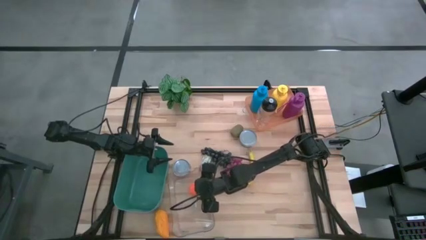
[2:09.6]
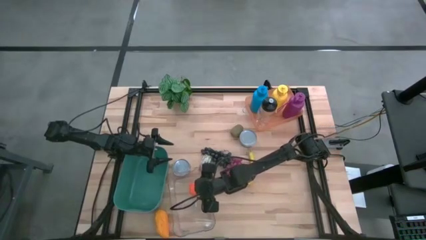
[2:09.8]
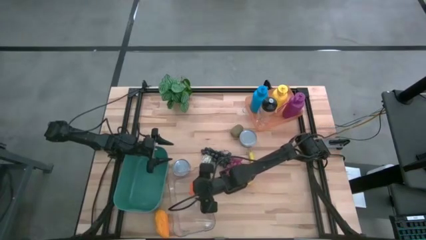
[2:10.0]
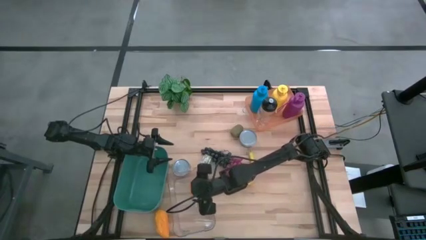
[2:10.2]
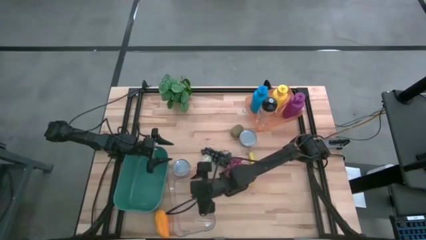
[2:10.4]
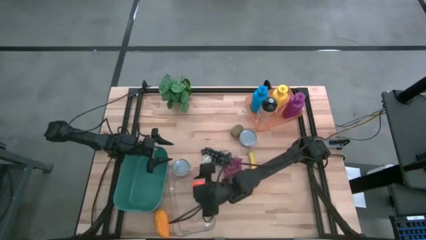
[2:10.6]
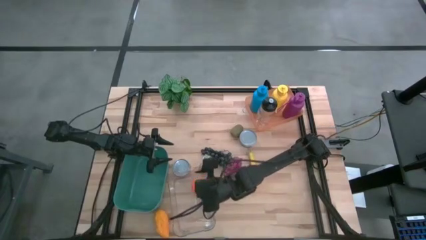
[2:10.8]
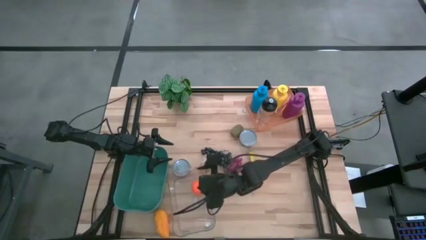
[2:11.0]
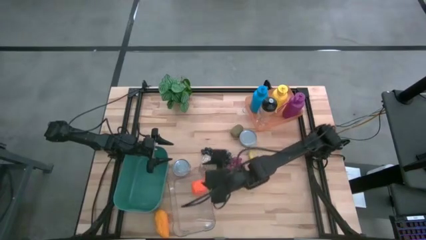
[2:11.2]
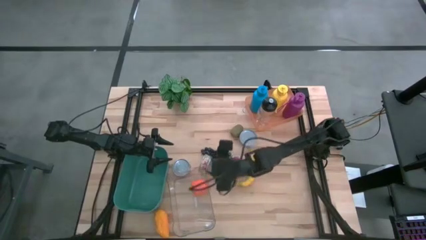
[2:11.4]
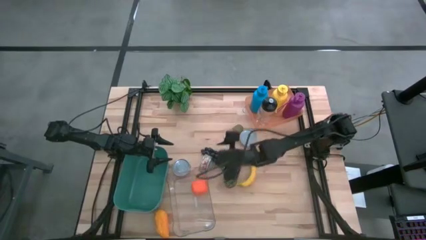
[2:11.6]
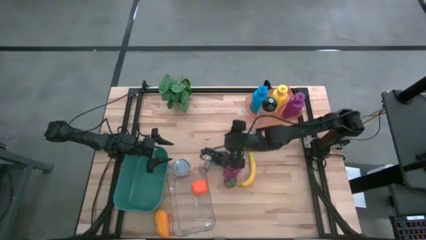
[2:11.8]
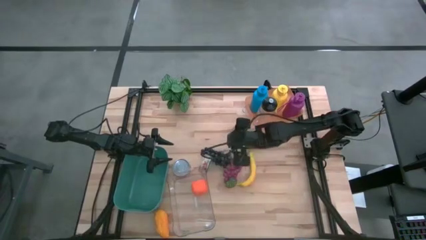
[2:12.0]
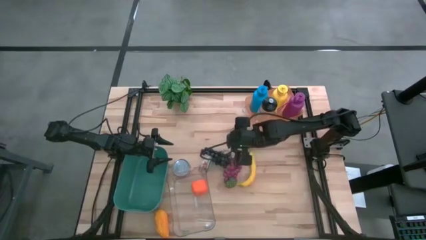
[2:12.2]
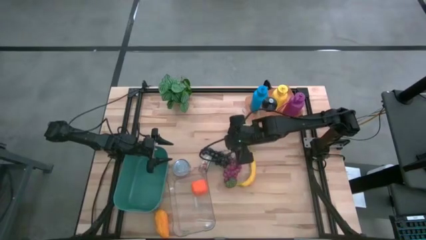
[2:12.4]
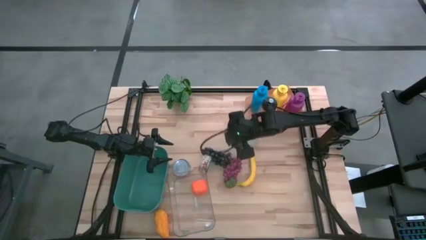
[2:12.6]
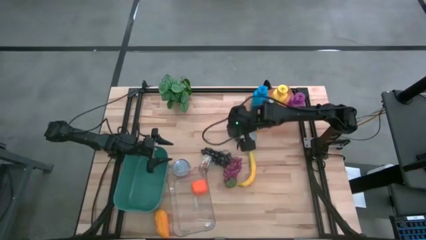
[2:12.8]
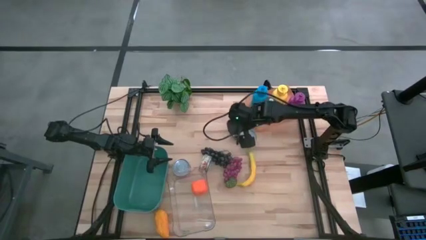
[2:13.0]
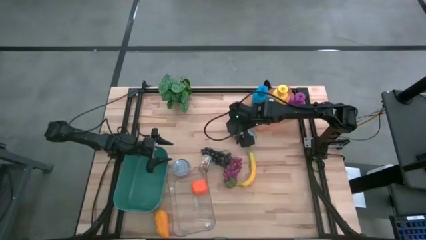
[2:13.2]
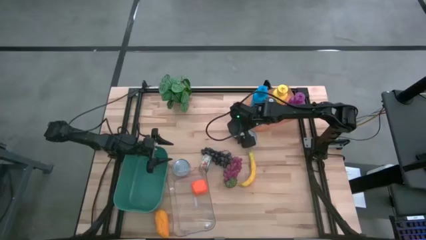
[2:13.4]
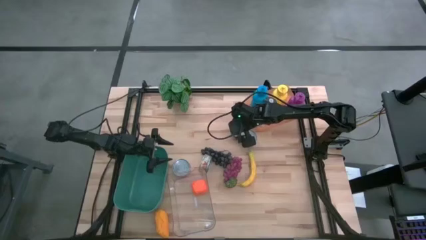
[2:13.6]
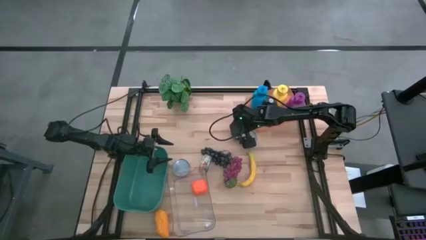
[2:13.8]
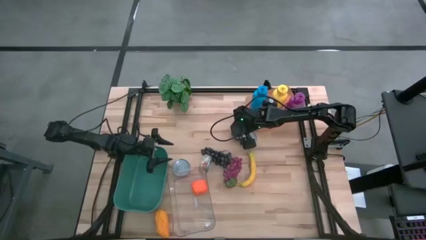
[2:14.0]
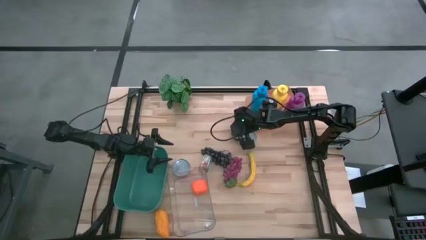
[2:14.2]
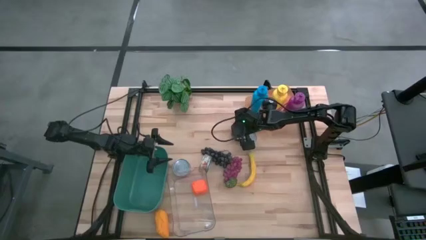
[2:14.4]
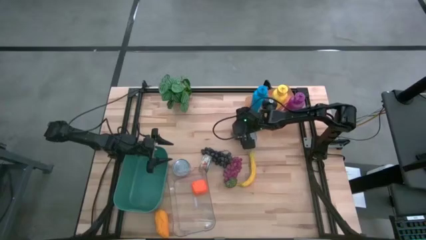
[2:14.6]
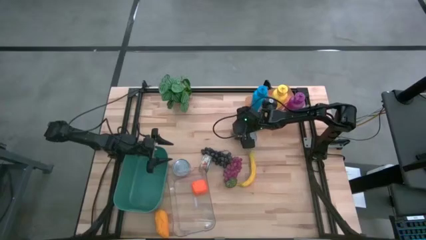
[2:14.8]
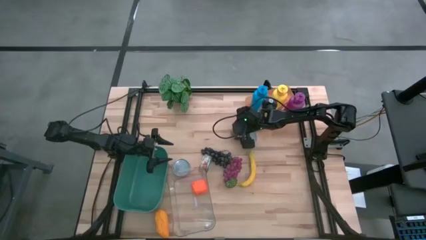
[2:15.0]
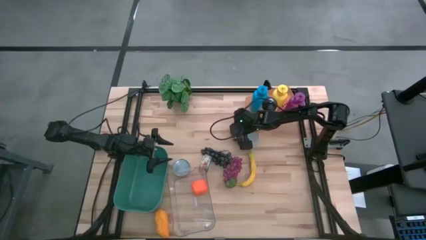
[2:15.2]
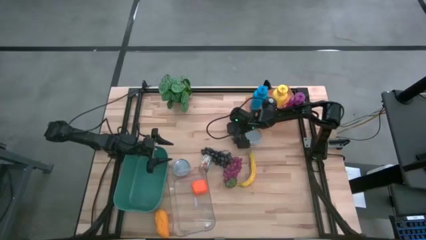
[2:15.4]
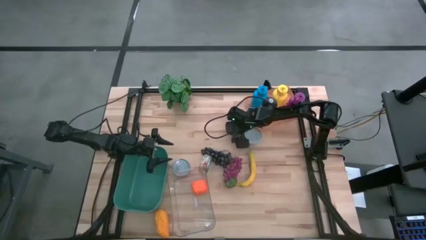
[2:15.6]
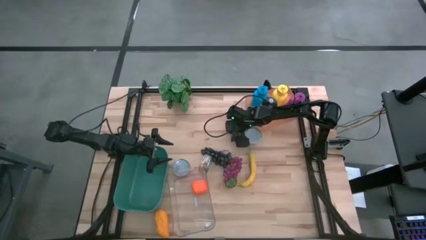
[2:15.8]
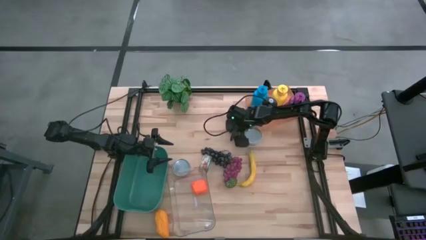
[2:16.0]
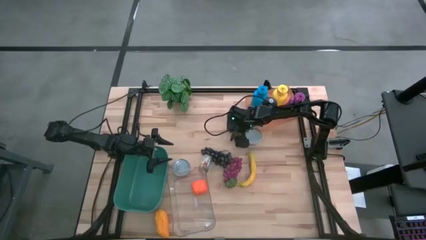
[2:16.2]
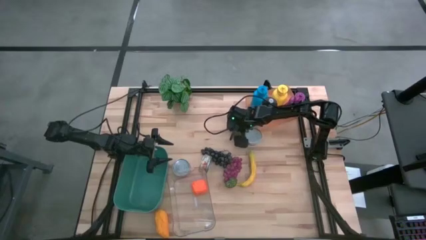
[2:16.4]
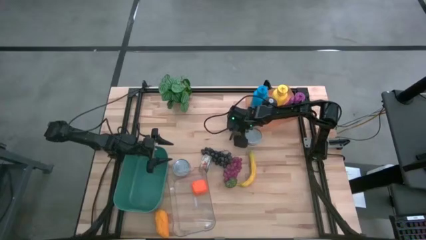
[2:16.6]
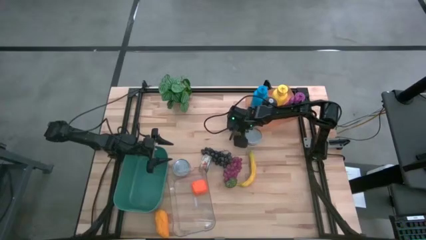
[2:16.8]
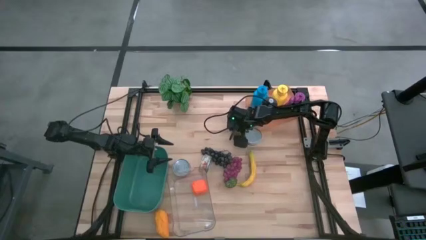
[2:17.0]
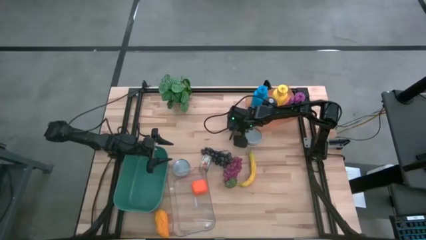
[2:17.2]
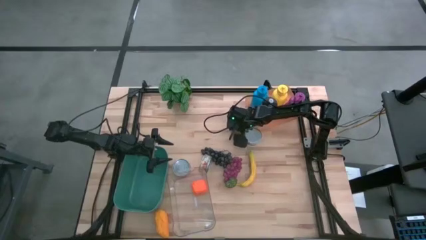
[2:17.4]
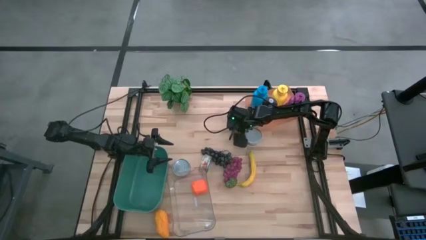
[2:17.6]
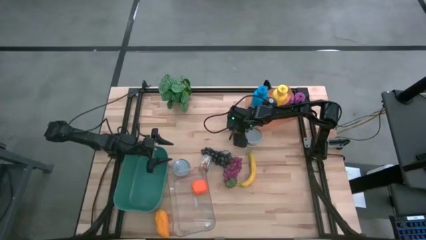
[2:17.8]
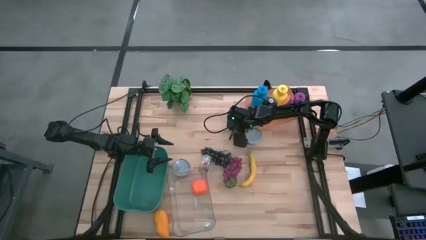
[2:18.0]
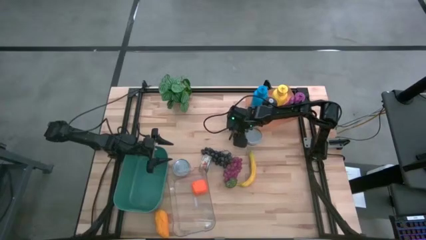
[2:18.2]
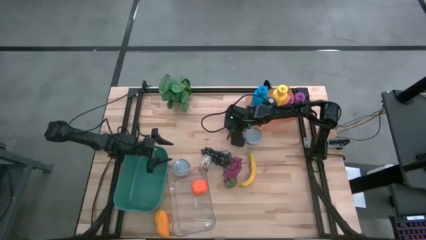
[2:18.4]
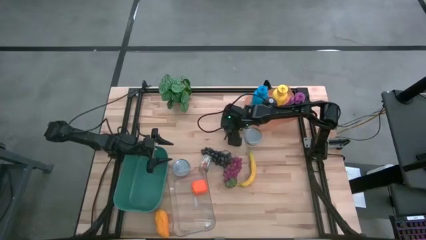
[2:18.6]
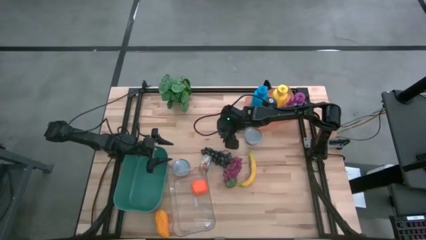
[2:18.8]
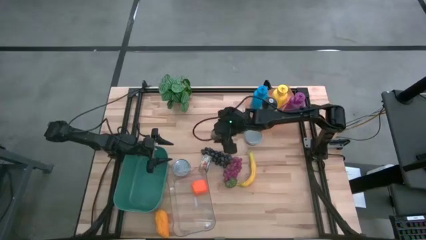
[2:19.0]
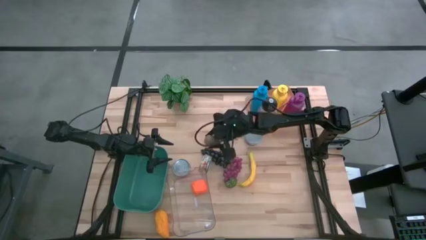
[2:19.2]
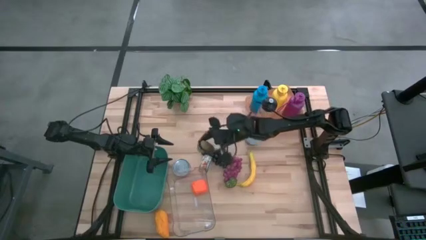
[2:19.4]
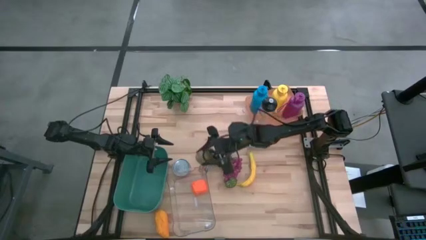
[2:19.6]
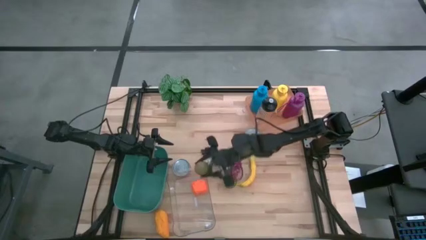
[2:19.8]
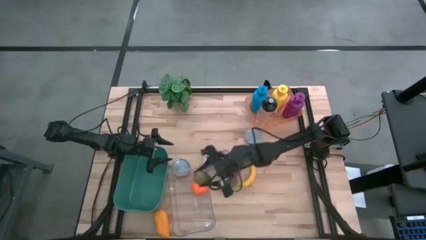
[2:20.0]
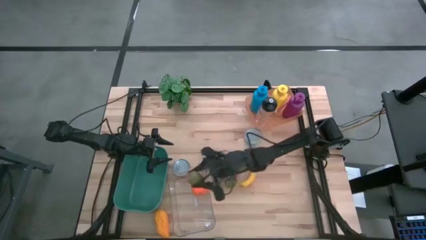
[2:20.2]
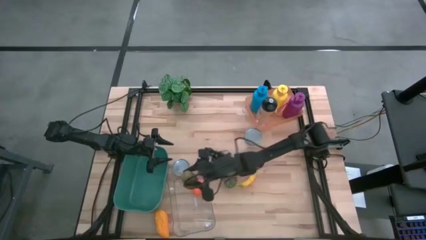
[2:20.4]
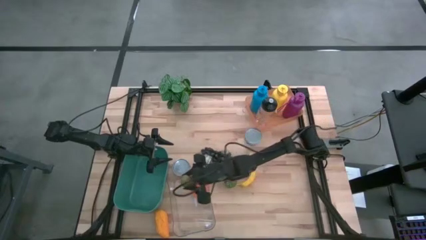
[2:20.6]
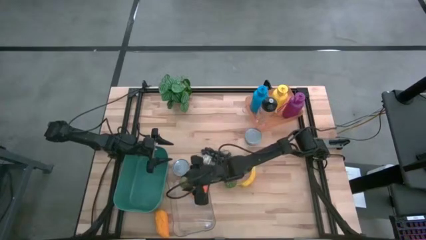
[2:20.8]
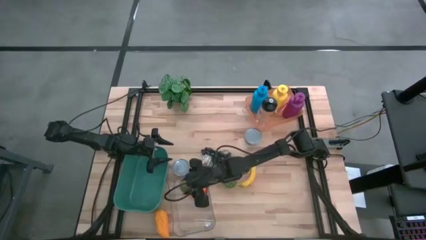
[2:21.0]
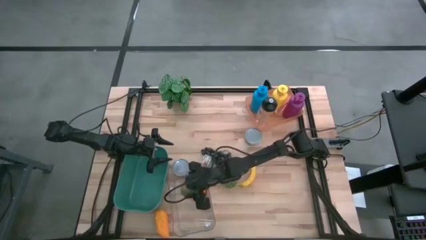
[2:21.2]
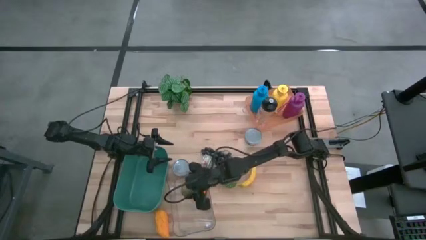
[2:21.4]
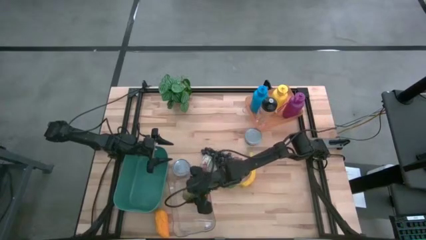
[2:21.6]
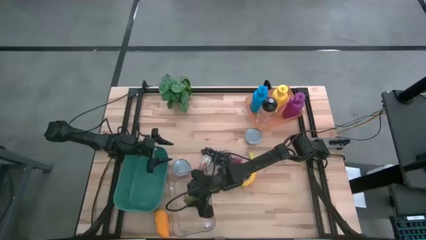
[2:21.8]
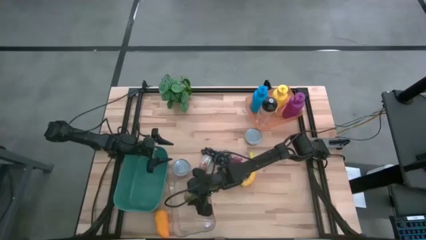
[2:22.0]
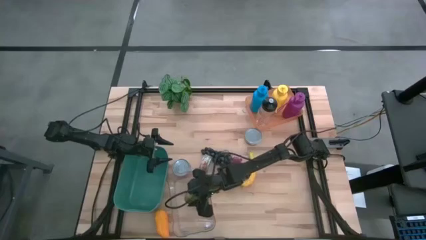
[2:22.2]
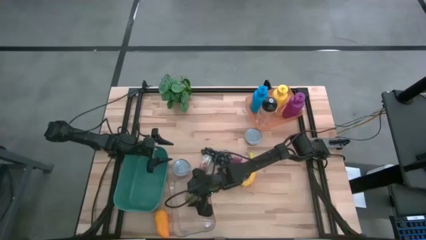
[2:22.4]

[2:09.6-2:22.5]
Task: Pick & Place Food Item
Put the kiwi into the transparent bin

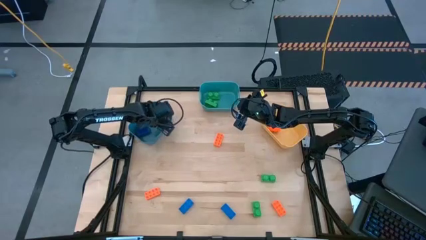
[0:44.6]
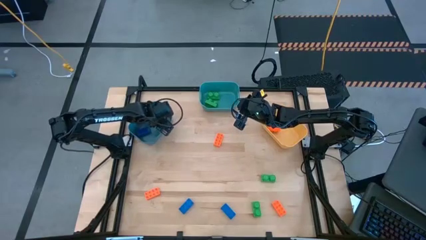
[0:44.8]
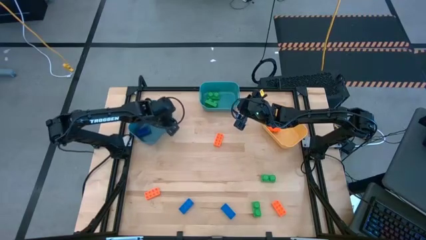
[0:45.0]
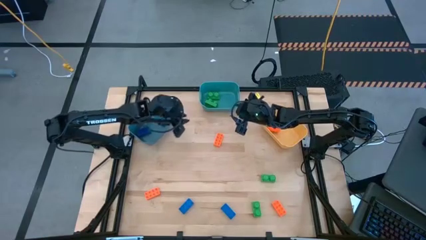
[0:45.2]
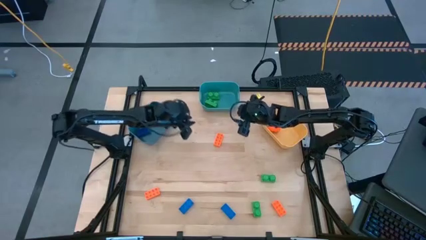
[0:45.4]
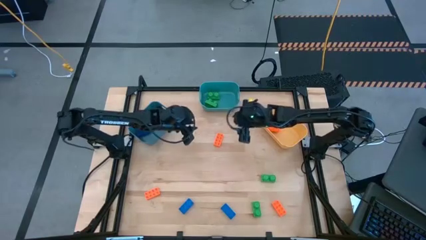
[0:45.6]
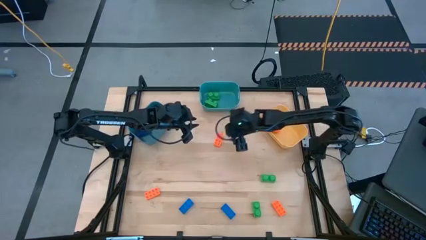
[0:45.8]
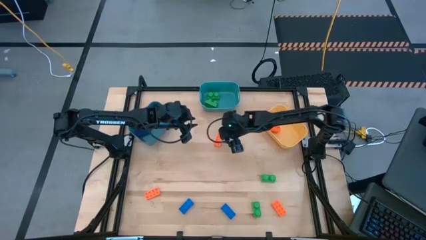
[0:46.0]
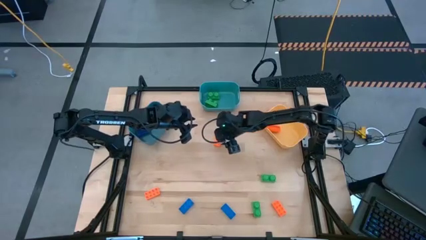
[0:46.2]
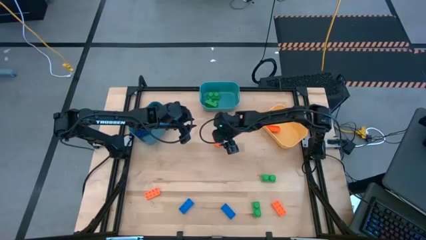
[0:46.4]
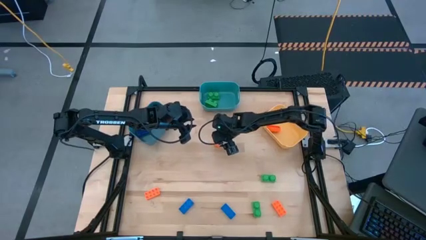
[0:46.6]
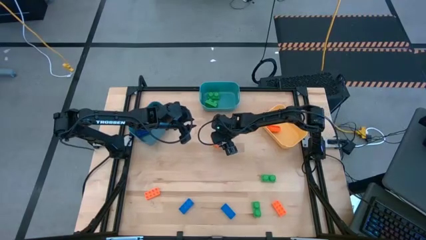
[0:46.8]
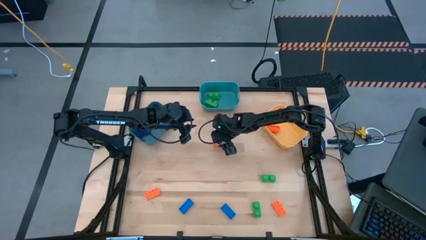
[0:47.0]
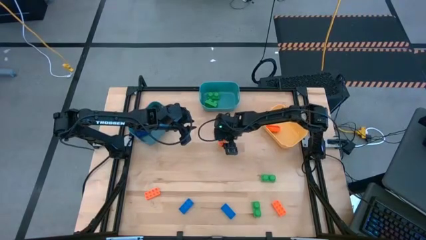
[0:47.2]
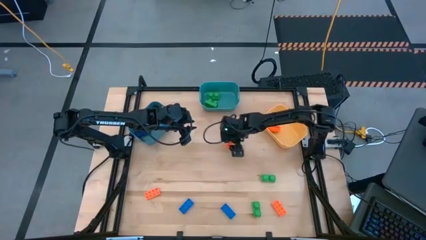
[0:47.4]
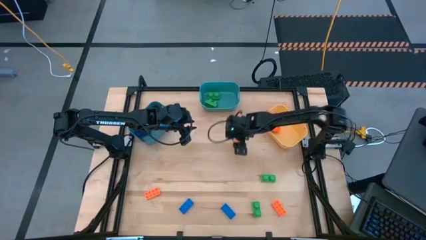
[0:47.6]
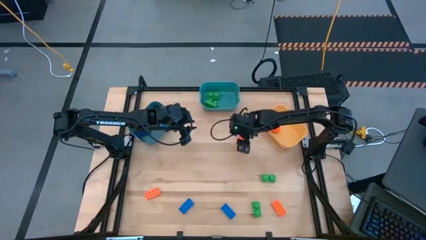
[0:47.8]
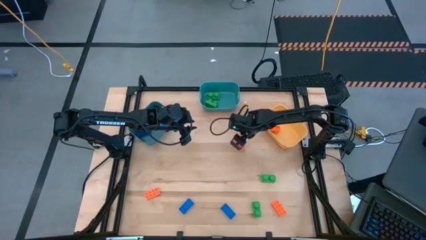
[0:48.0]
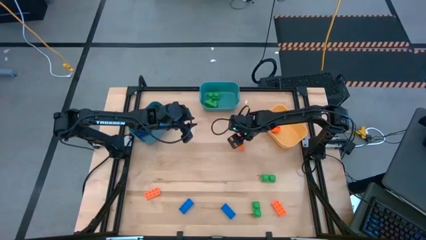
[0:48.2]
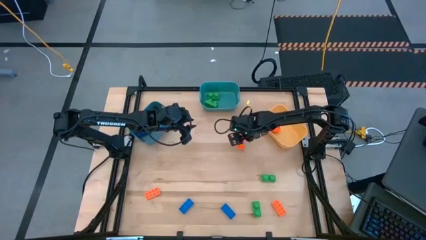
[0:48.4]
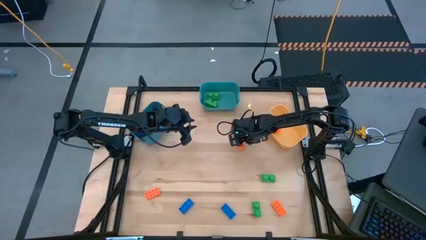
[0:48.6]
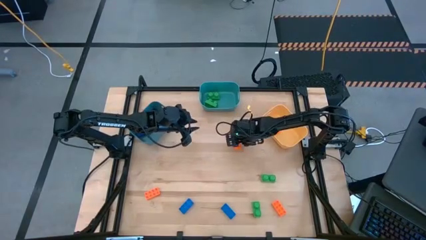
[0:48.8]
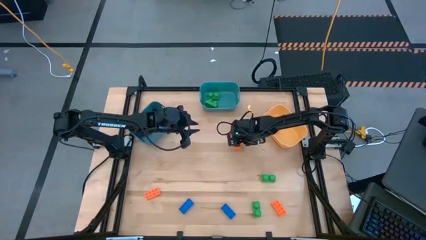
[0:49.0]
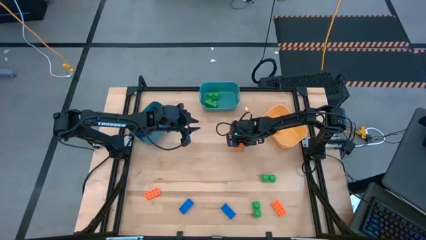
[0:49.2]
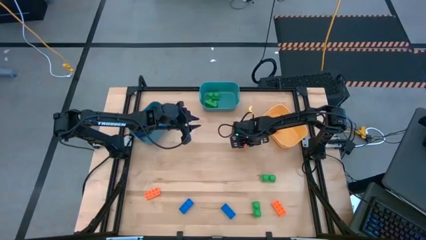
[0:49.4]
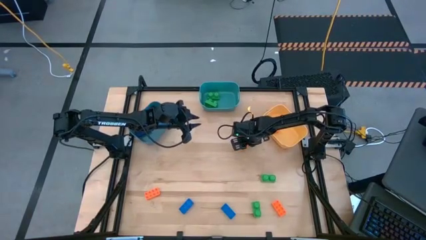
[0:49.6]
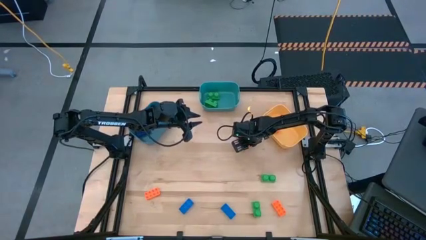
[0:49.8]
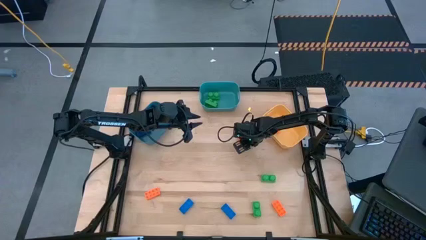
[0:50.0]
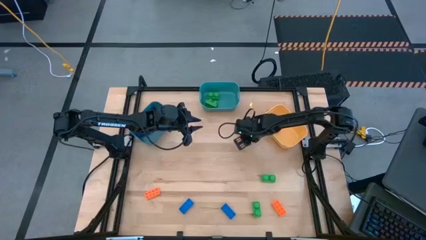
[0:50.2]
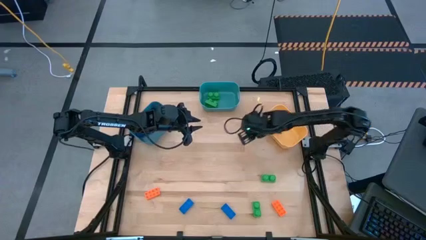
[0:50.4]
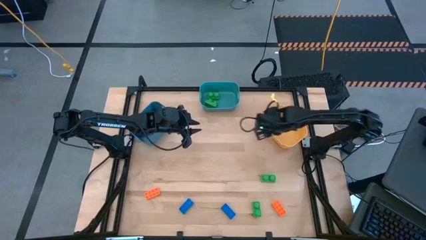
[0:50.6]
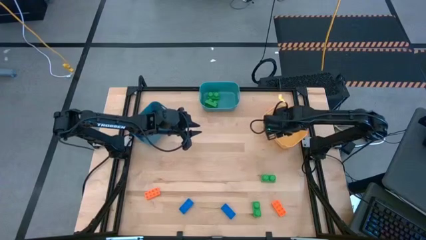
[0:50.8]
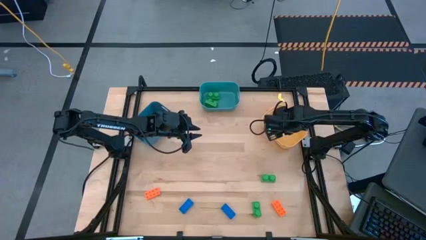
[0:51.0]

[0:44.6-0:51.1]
Task: Sort & place blocks by color
Put the orange game piece into the yellow bin
